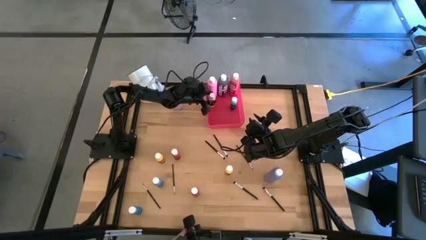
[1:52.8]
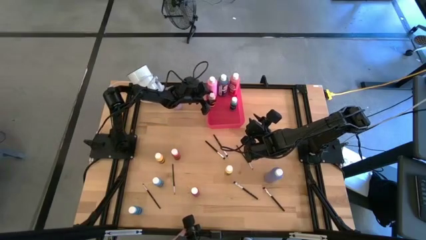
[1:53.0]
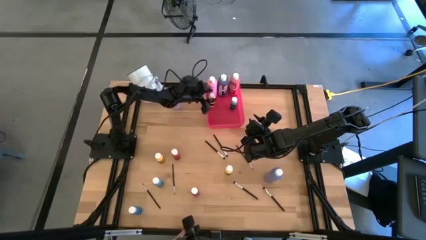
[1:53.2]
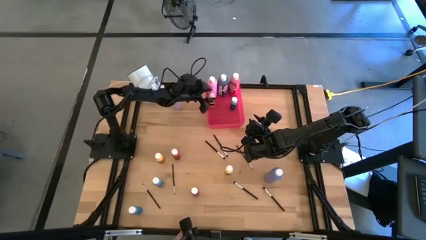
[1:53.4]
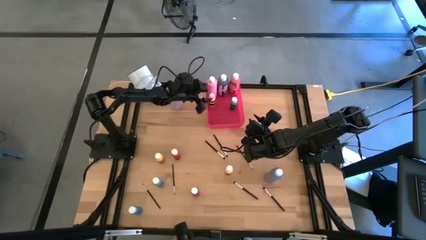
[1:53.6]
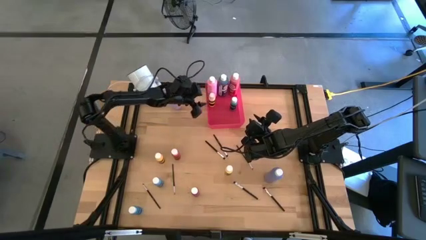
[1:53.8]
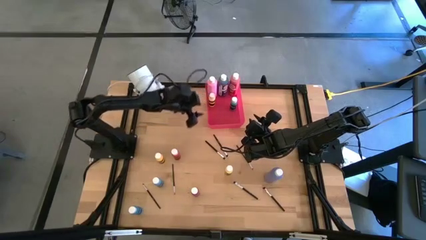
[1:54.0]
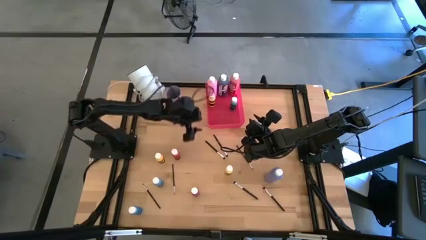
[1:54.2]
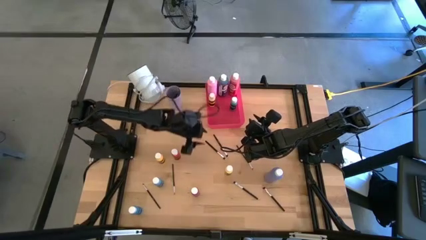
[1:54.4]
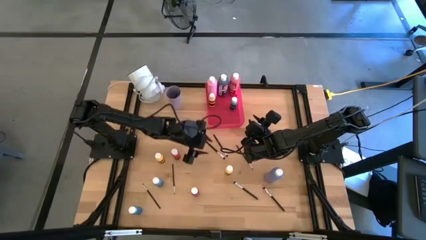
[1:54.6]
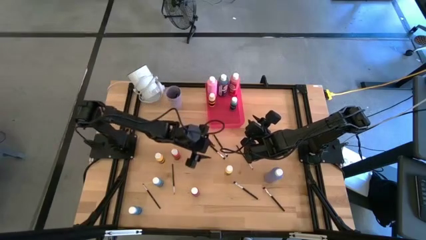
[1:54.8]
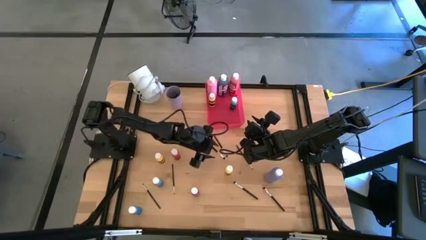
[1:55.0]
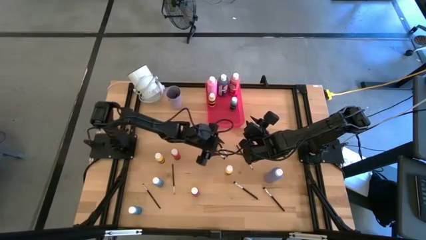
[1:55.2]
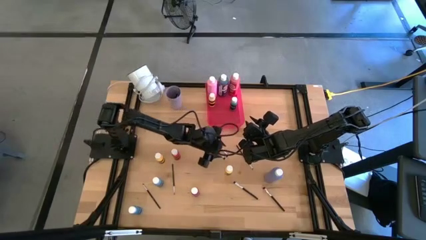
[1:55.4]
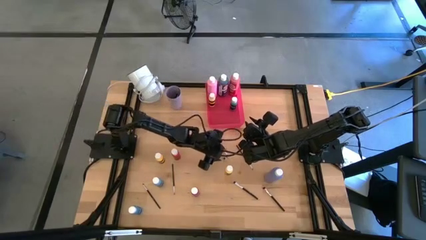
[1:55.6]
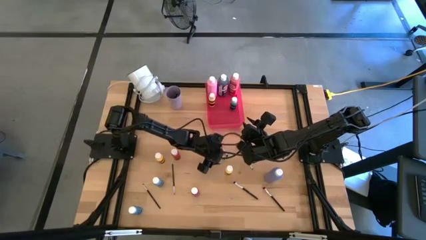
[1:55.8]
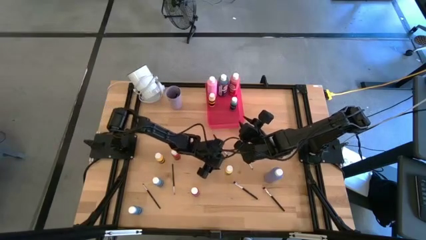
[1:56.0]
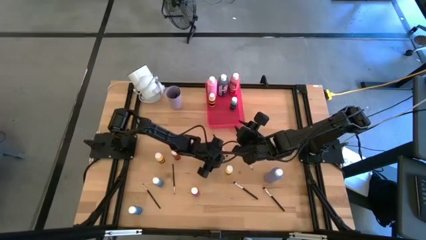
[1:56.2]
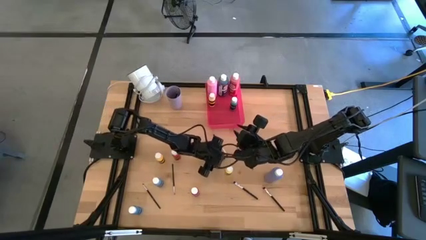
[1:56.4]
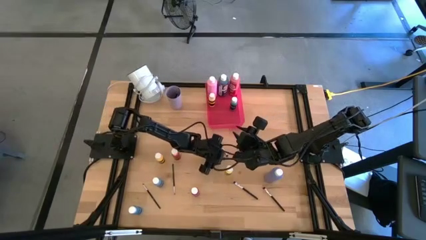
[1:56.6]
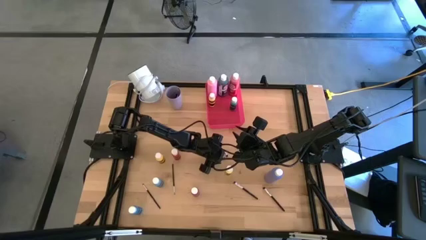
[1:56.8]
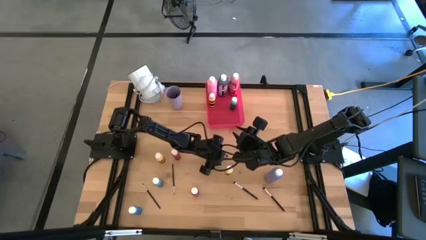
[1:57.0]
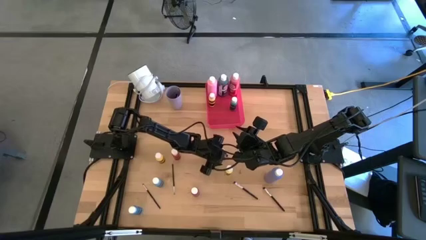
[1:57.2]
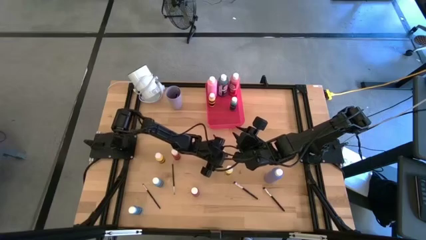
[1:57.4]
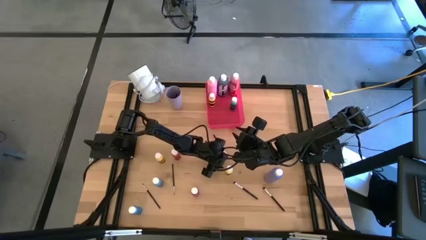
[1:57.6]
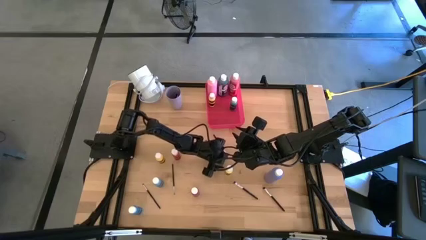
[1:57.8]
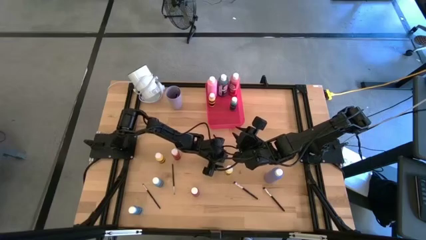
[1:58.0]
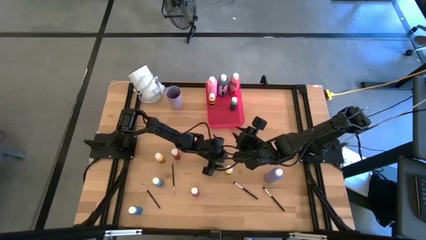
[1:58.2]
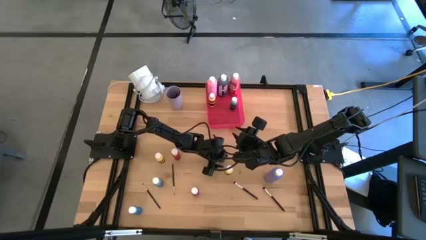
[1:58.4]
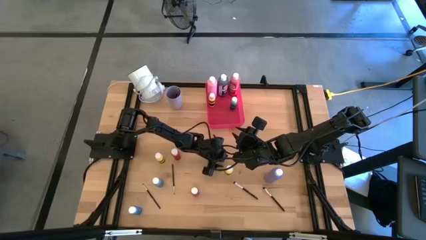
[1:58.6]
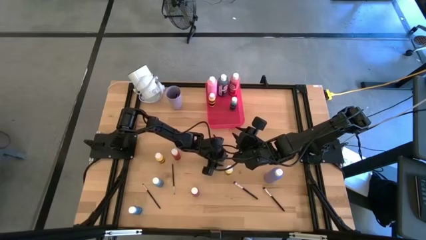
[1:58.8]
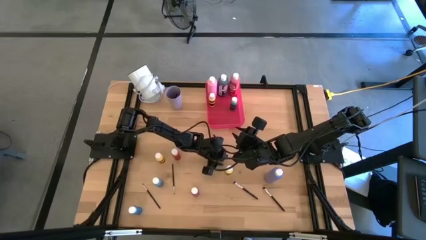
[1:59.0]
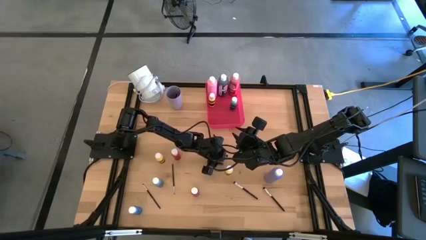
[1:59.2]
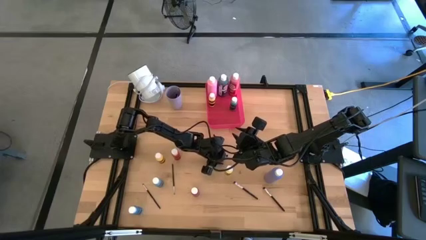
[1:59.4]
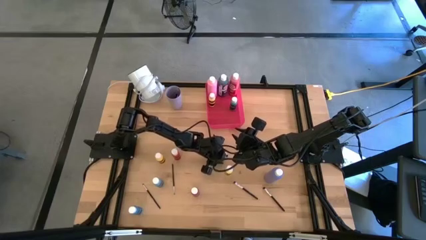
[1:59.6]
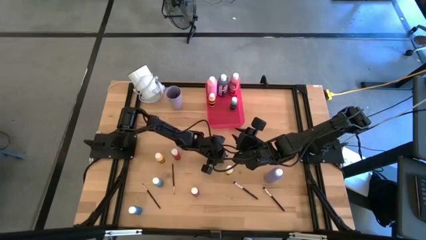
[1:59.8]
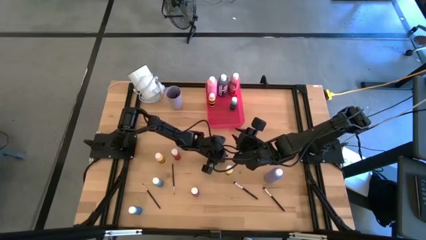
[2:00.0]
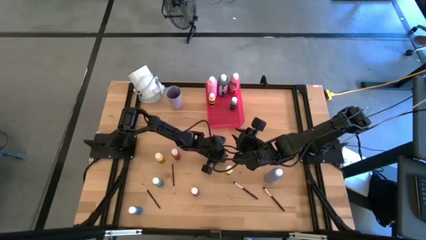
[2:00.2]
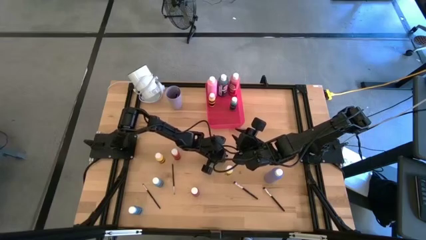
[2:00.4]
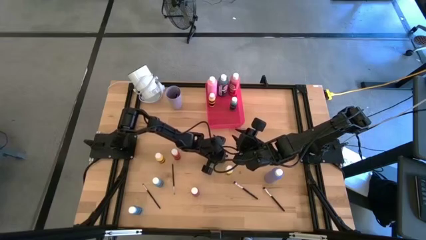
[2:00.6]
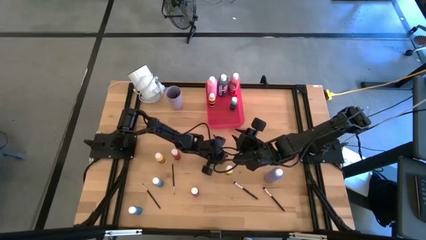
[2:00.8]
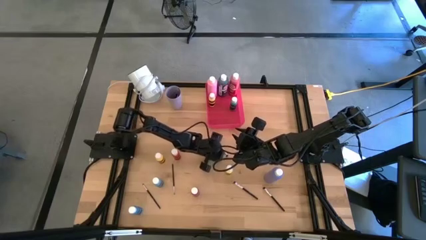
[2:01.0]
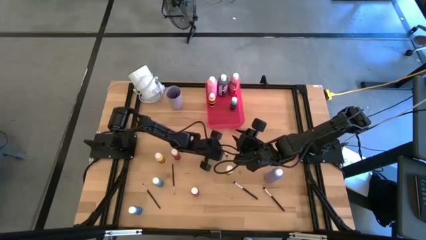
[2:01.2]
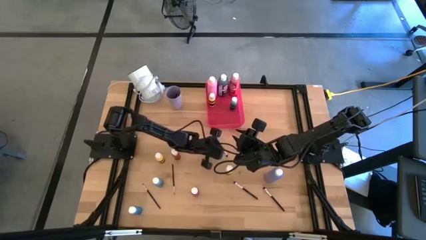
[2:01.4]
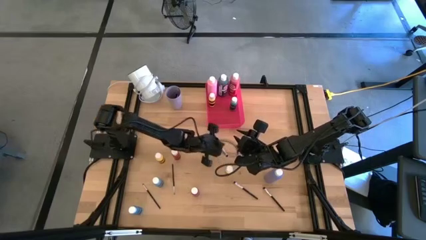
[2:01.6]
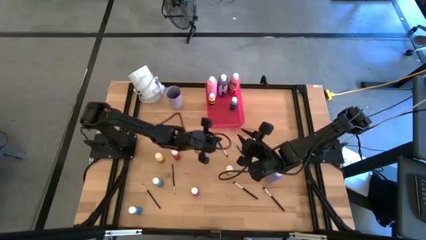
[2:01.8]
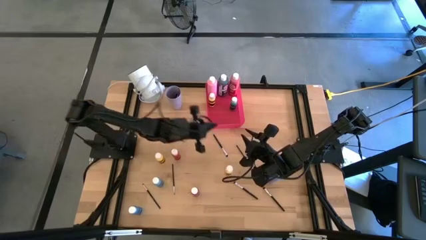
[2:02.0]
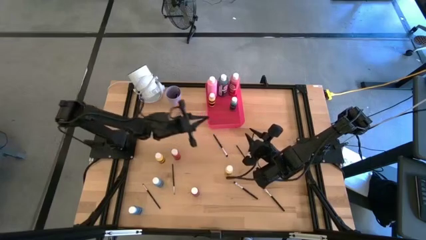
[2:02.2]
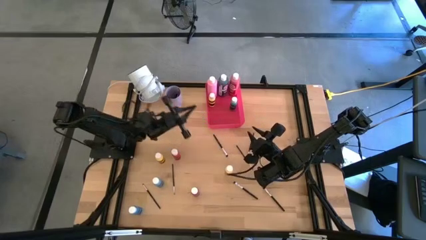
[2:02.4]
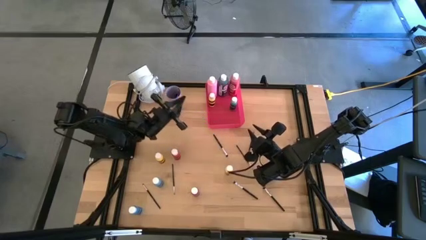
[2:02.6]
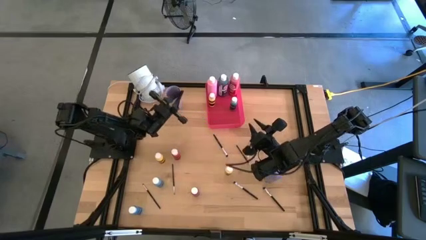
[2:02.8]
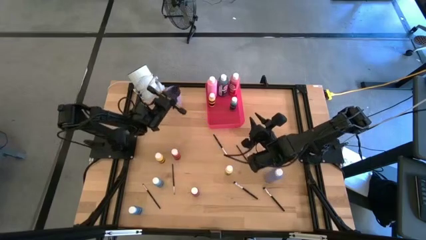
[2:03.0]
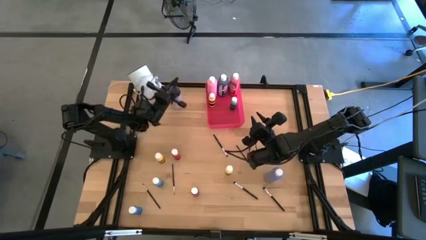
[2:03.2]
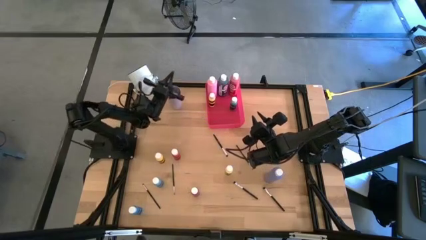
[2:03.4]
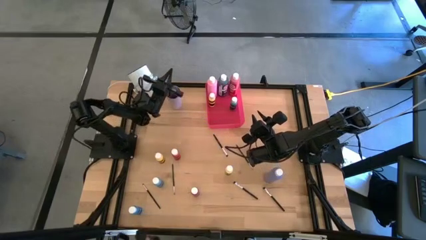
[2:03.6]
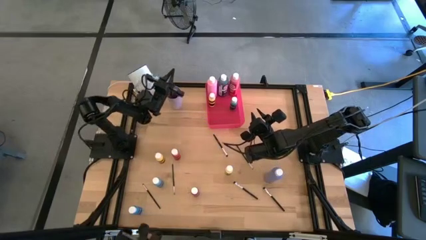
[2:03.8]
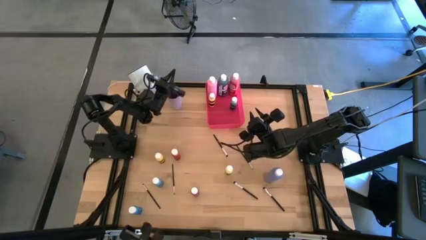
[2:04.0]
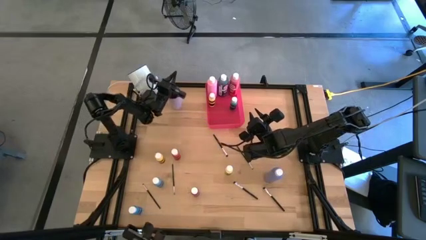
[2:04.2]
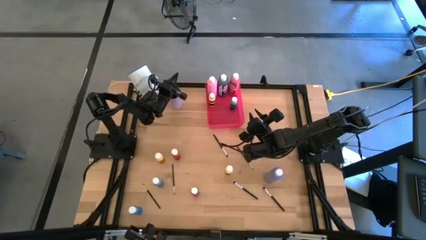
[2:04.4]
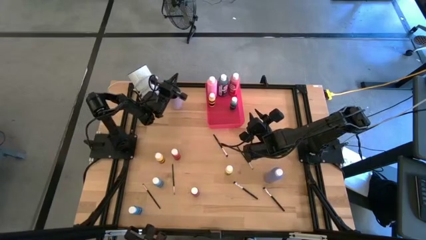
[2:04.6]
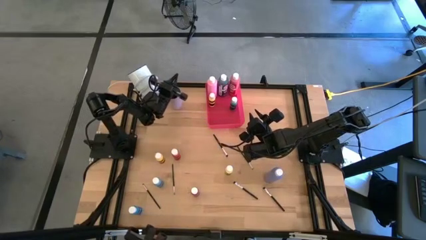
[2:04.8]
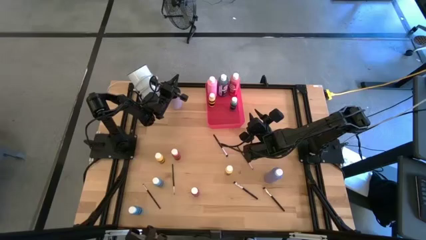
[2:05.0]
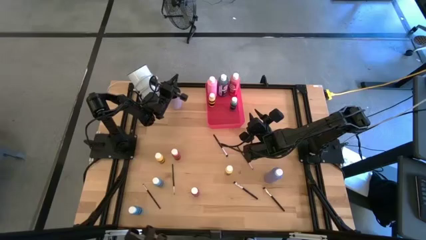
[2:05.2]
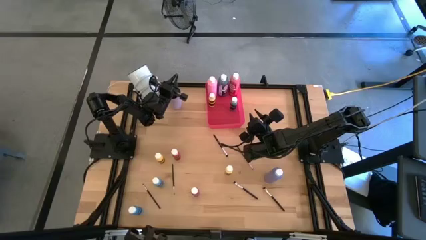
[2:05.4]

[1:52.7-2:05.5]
Task: Pick & Place Paint Supplies
Put the black paint brush into the purple cup

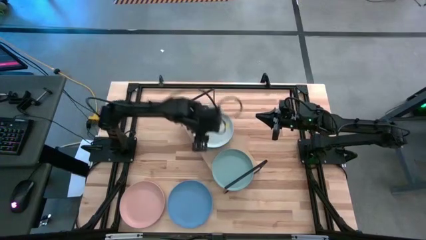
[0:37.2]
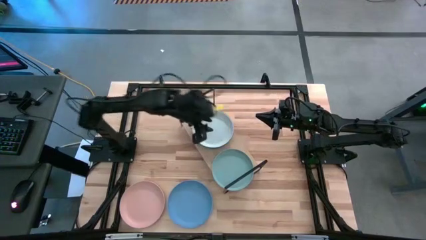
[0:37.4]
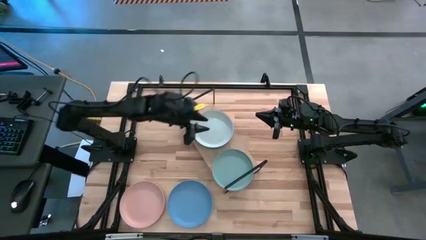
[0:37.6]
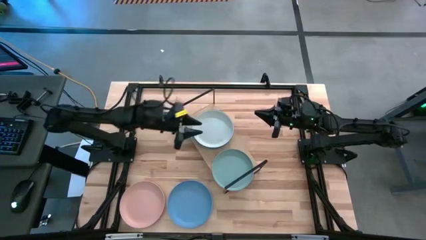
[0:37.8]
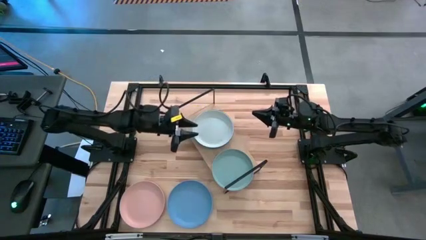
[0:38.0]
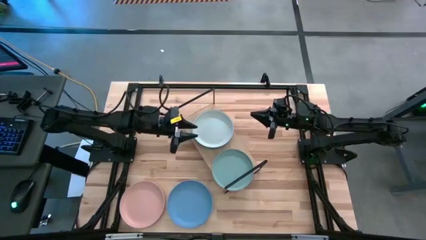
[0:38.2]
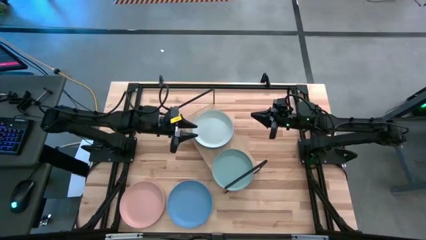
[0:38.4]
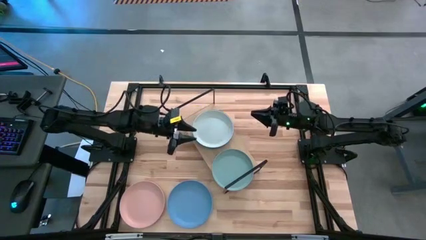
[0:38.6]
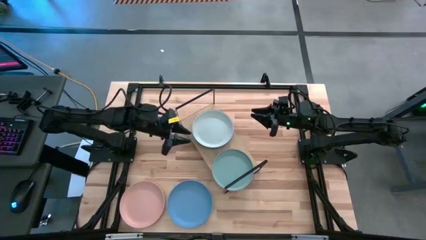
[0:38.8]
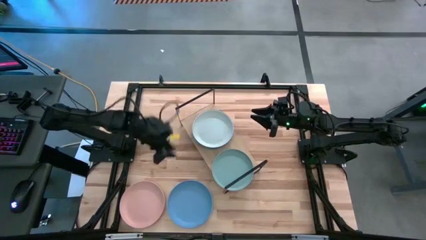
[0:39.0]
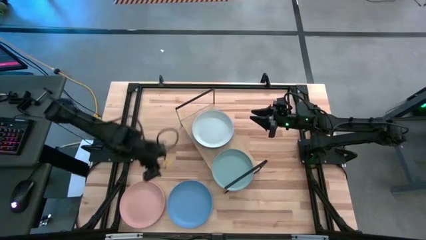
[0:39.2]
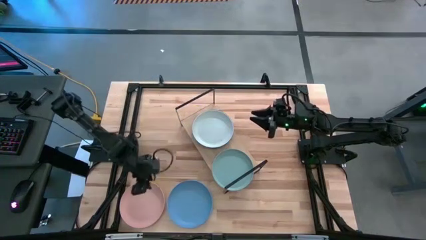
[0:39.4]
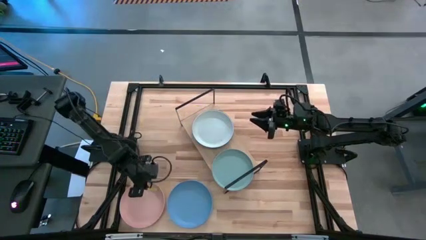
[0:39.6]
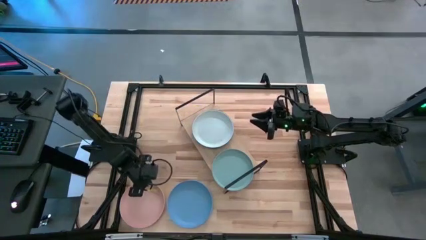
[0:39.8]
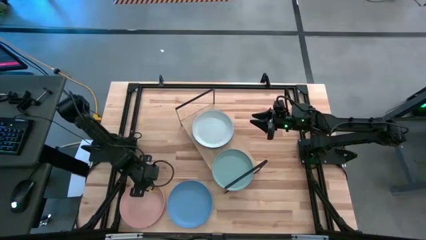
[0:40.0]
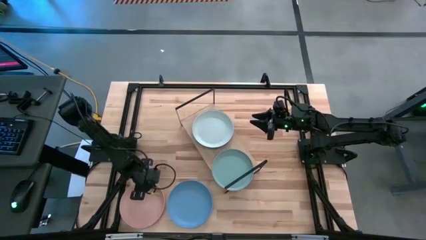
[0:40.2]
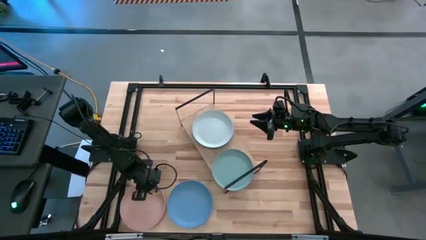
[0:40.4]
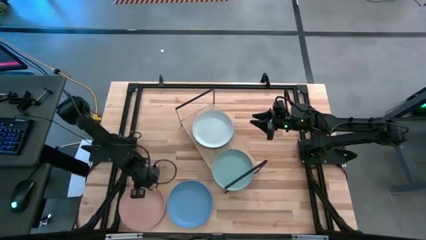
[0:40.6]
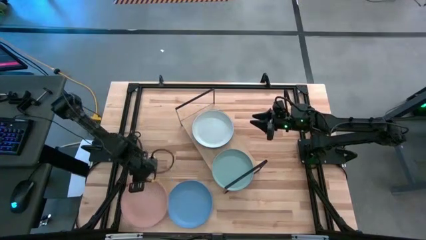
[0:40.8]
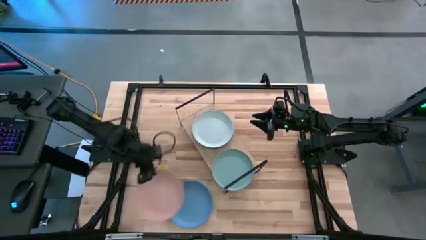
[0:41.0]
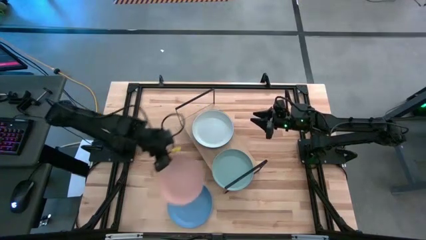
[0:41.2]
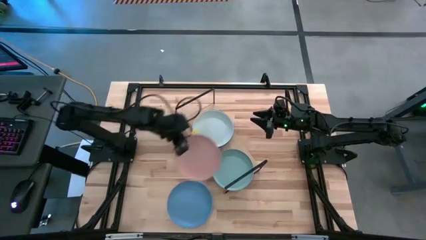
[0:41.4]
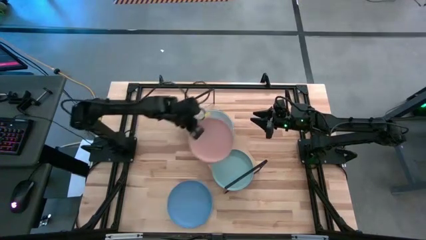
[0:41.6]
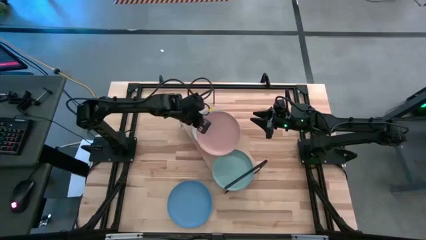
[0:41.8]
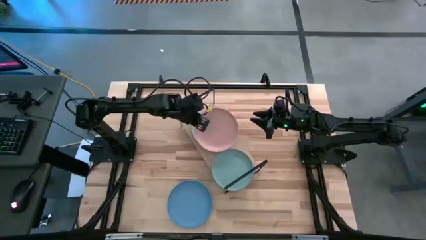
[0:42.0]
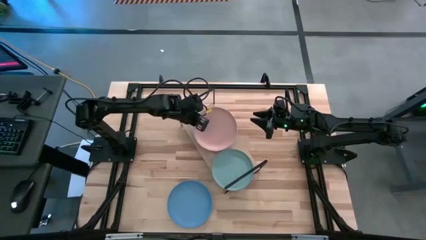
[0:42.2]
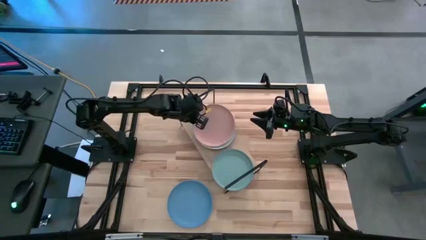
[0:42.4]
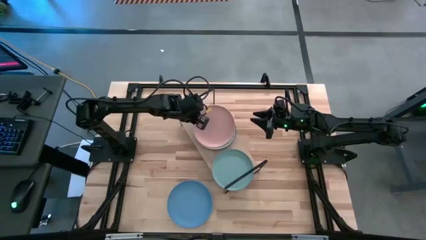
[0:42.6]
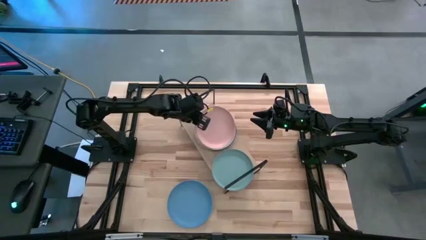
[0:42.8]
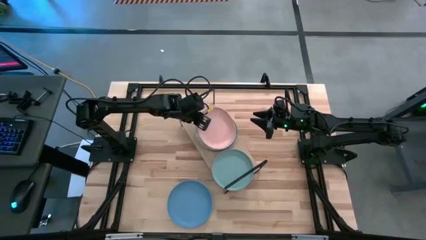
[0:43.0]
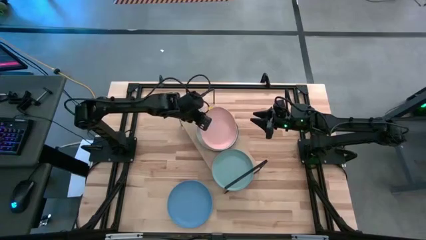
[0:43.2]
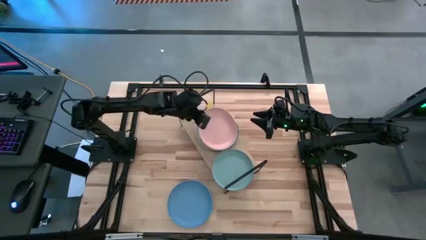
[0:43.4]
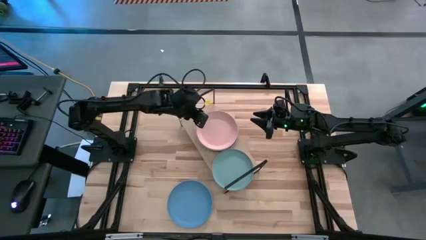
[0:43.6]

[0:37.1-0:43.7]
Task: Place and stack plates onto a shelf
Stack the pink plate on the top of the gray plate on the shelf
